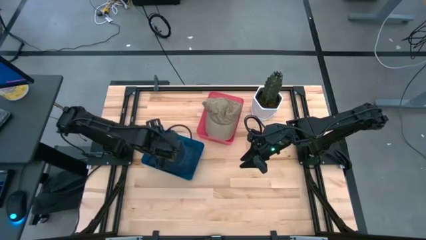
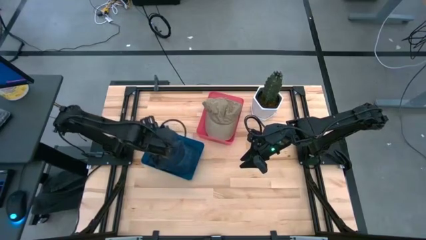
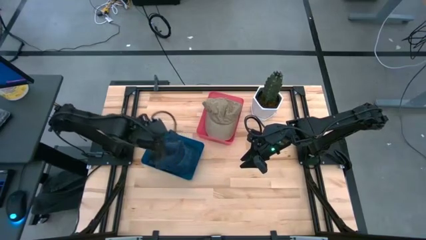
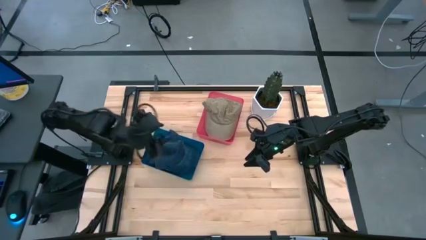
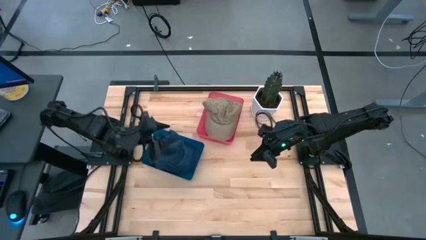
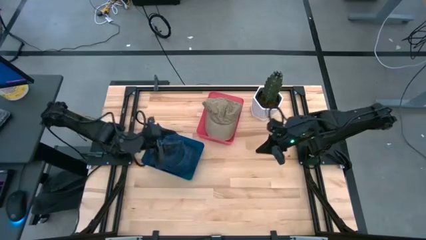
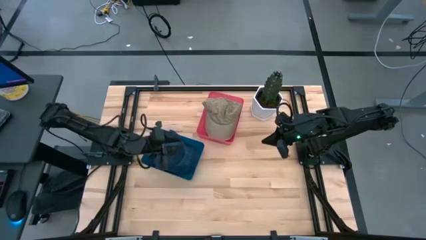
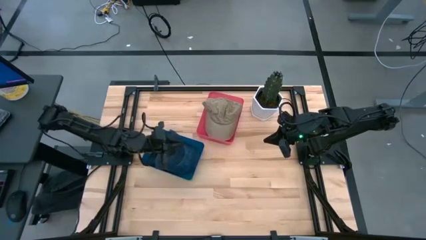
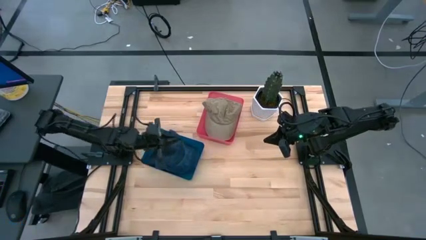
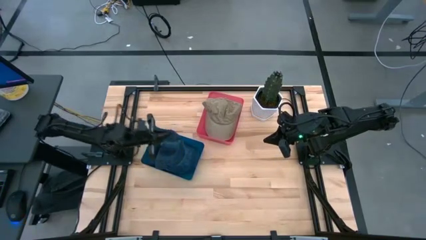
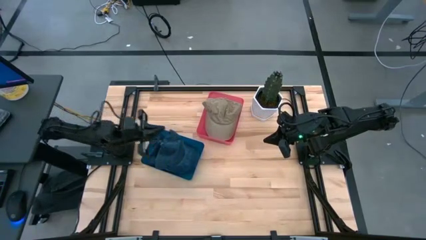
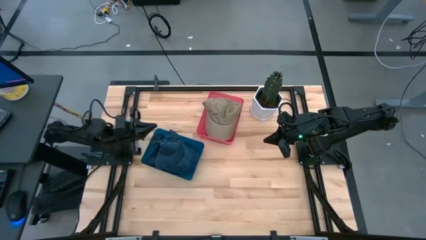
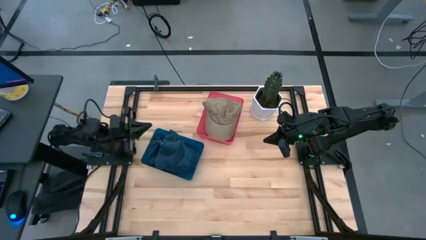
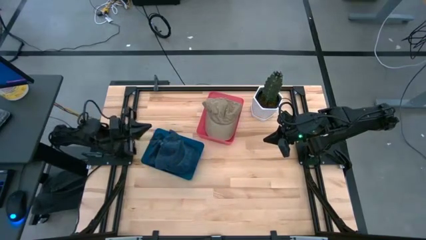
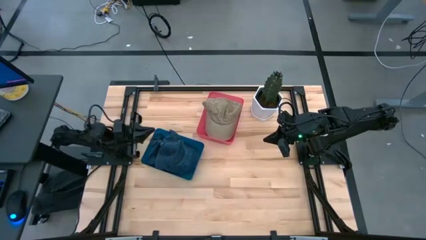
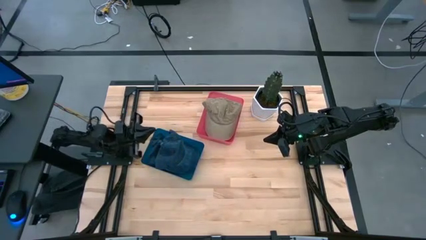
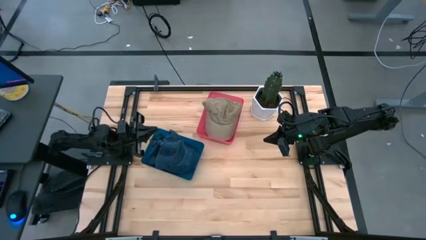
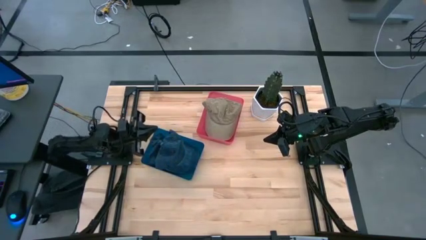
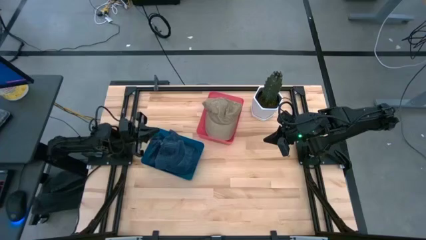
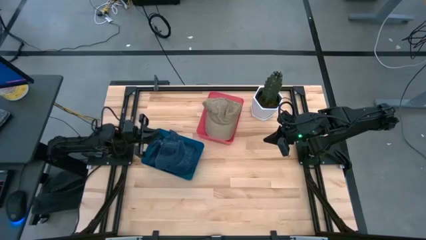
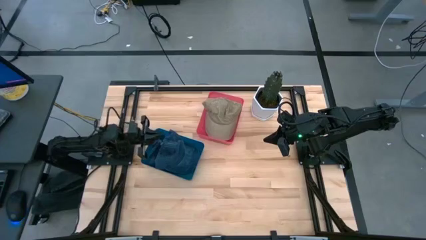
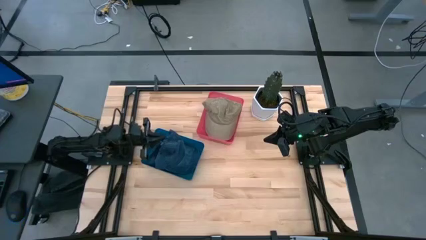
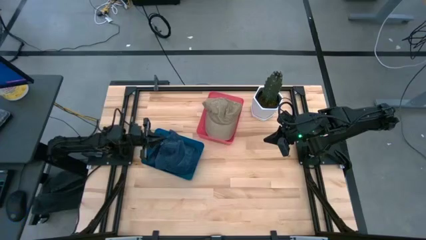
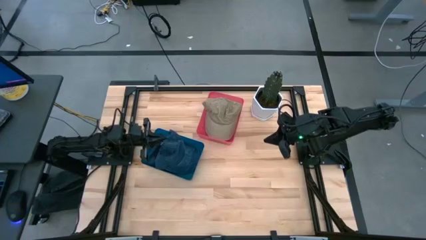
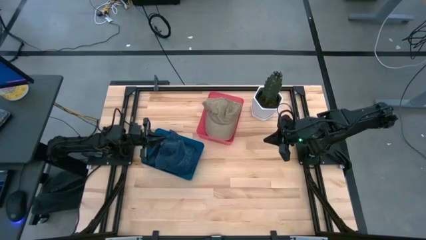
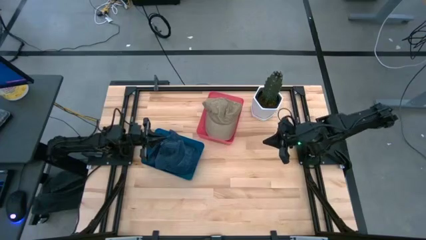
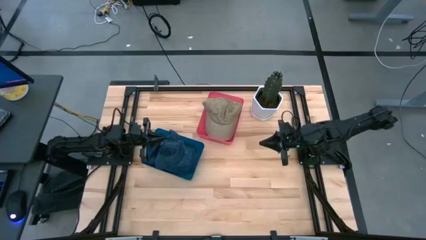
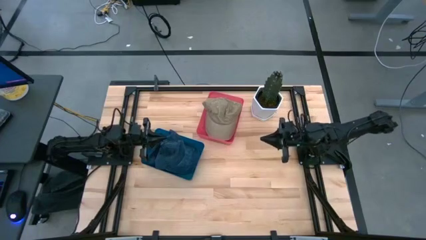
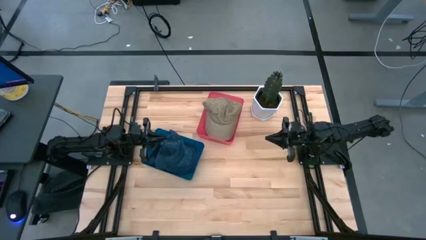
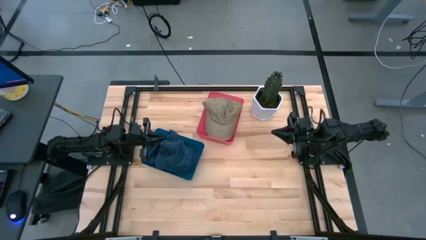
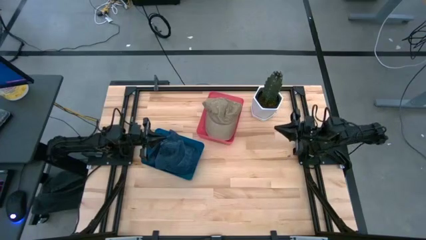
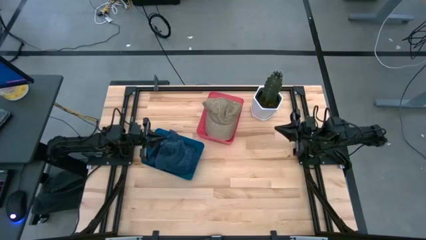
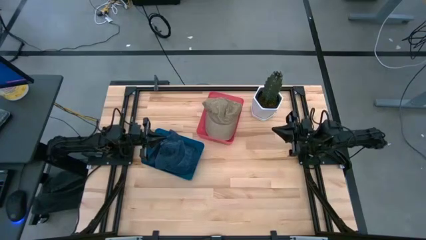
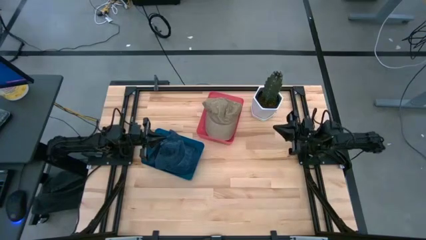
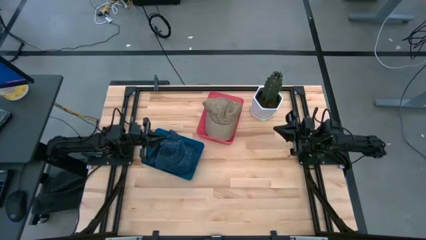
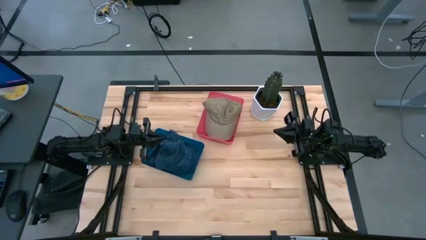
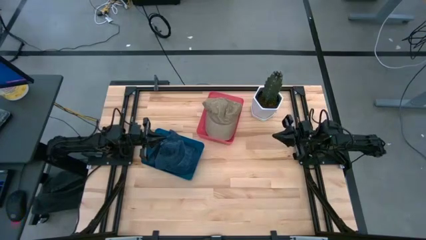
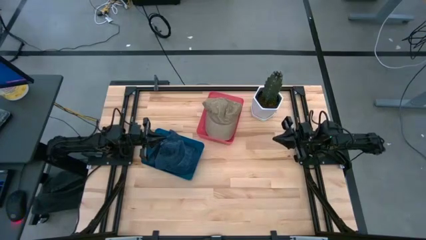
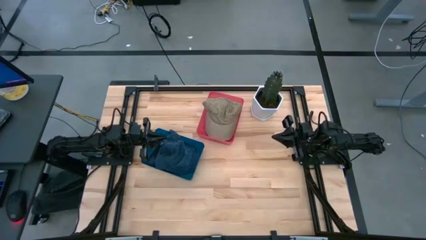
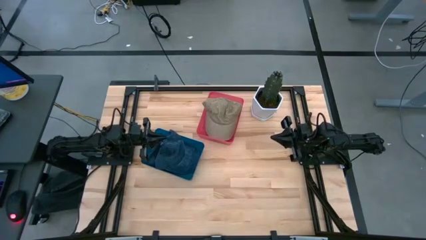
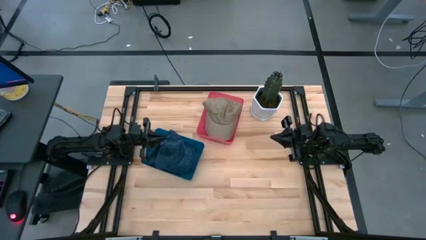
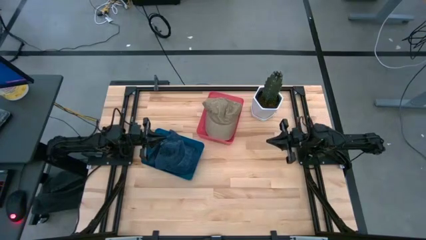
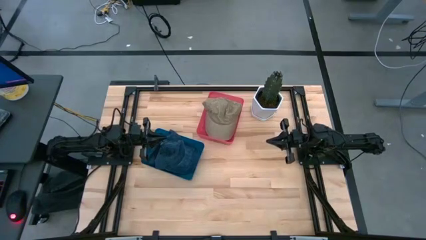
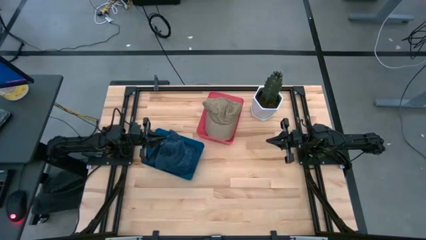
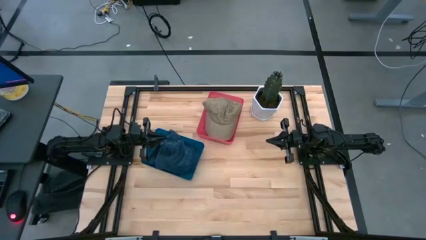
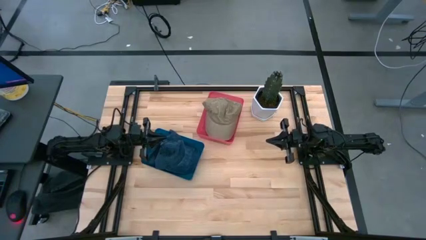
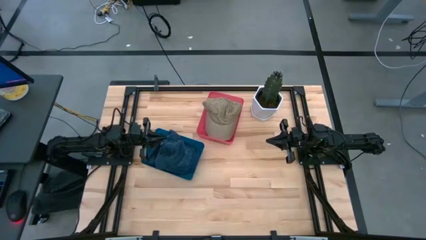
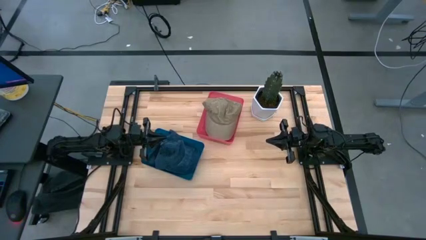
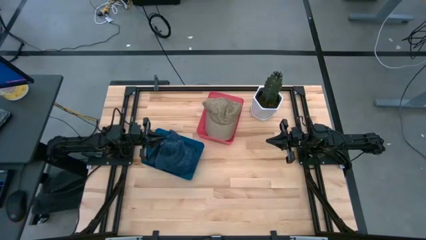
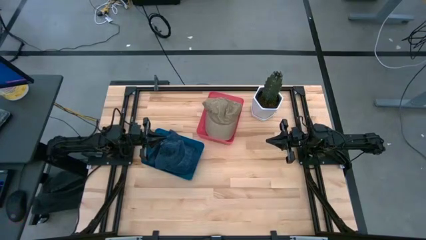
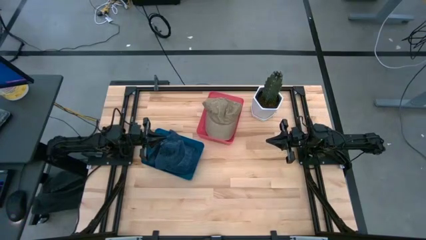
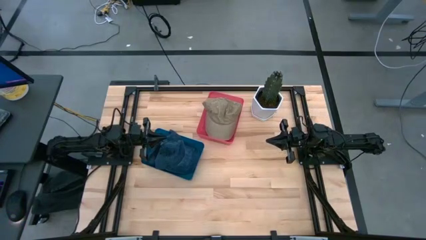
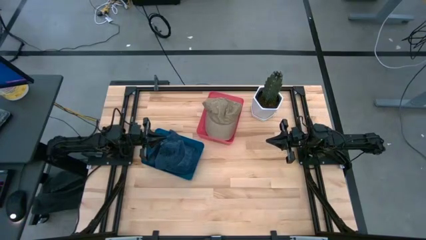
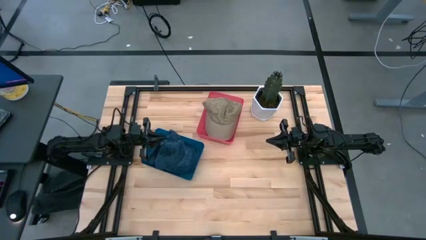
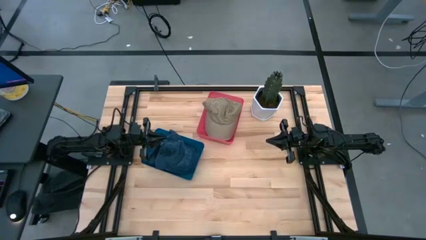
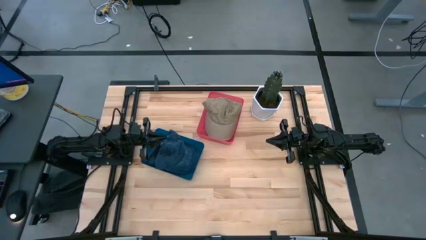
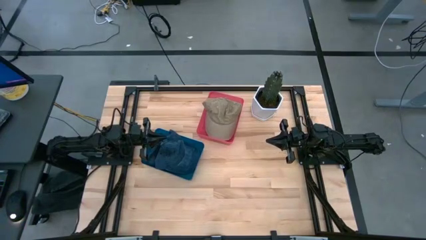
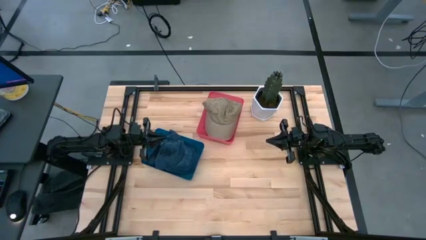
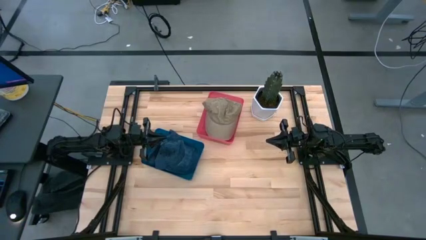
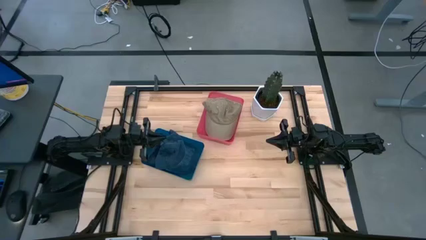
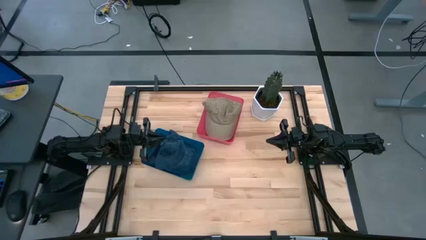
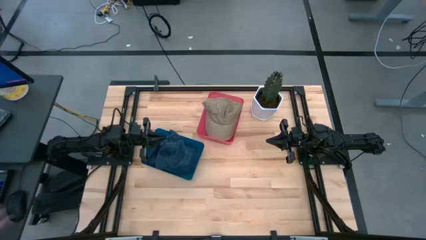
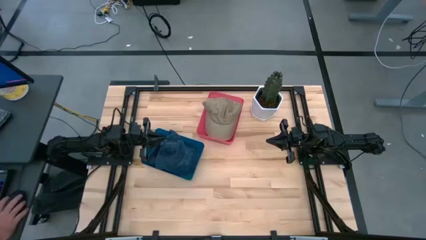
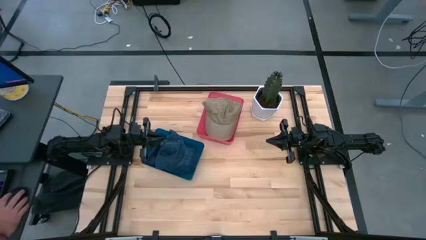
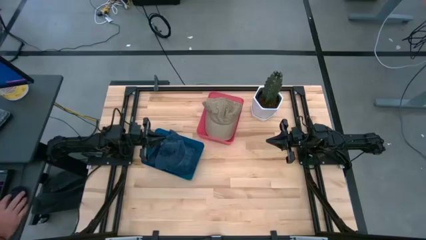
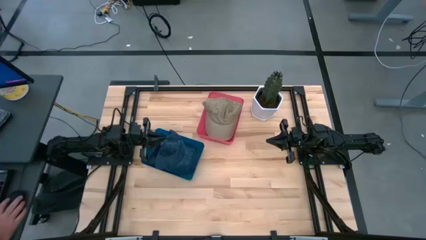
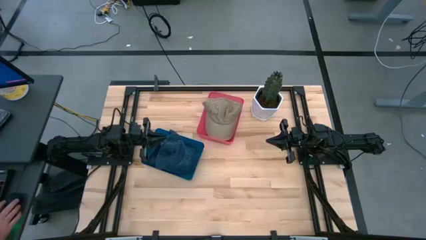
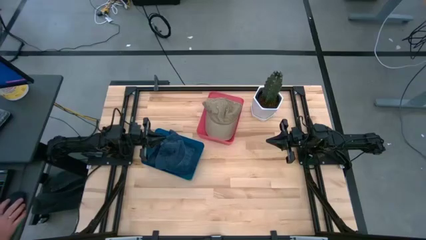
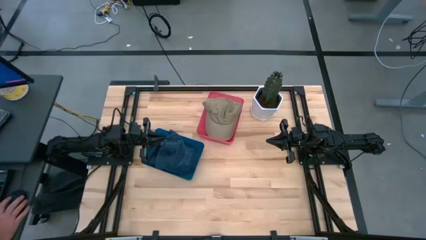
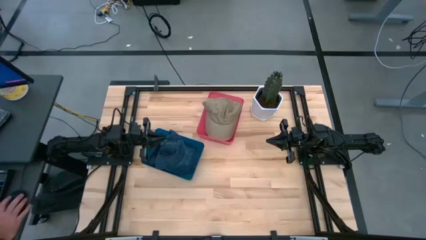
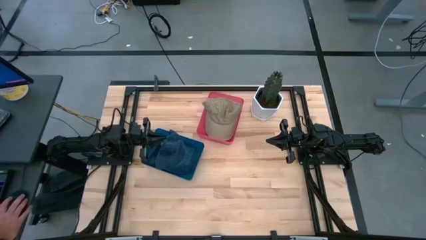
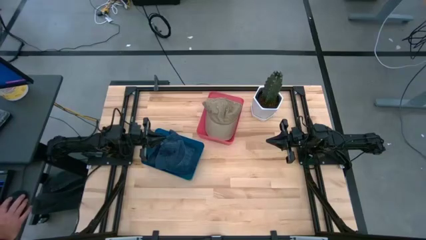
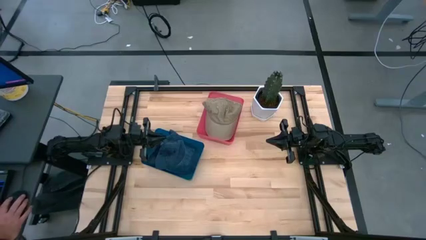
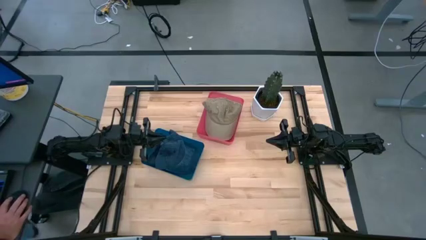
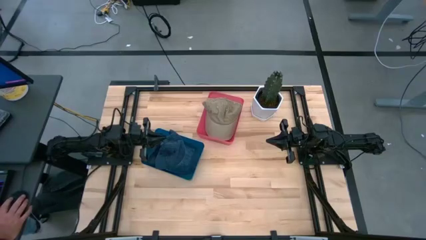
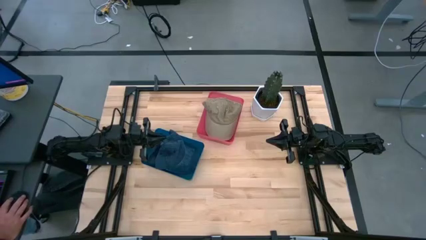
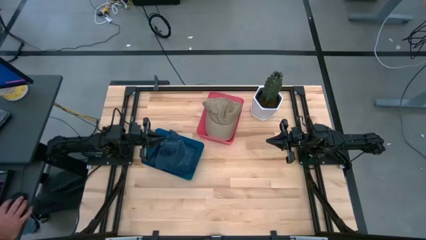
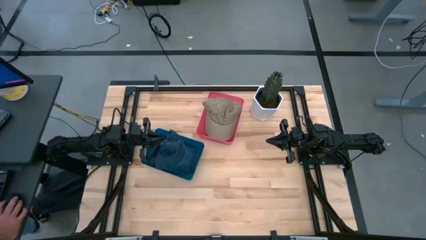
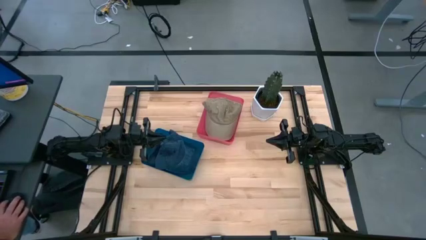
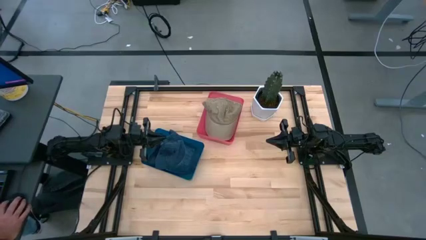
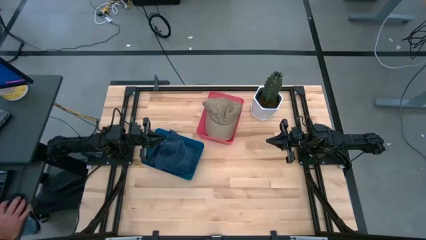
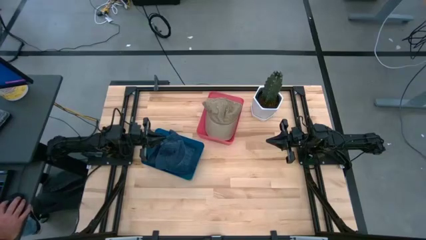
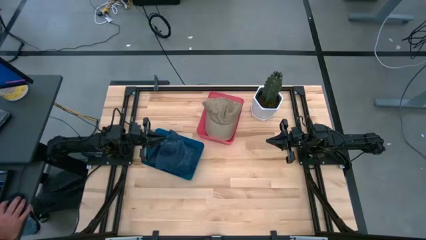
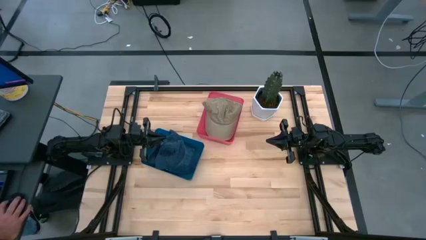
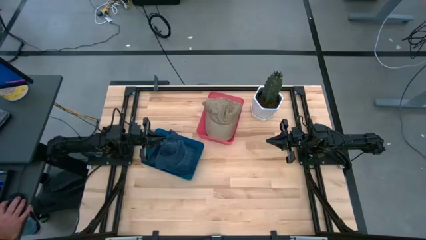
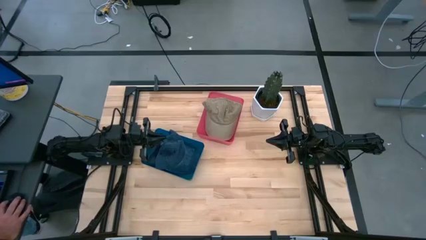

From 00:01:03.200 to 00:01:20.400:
Task: Pick & Place hat
Return to Home Position
